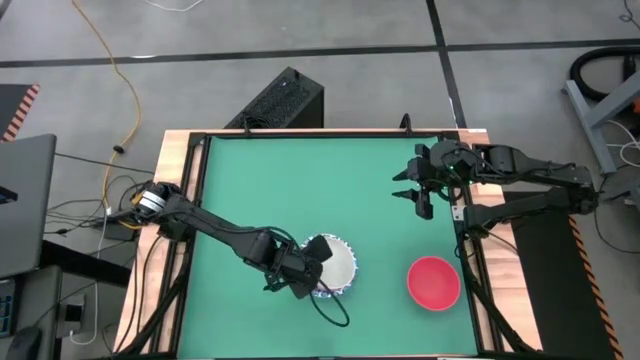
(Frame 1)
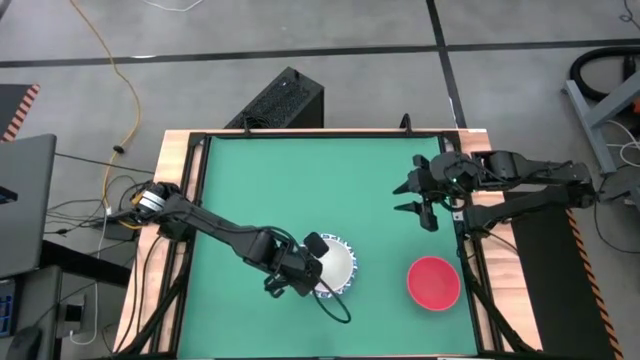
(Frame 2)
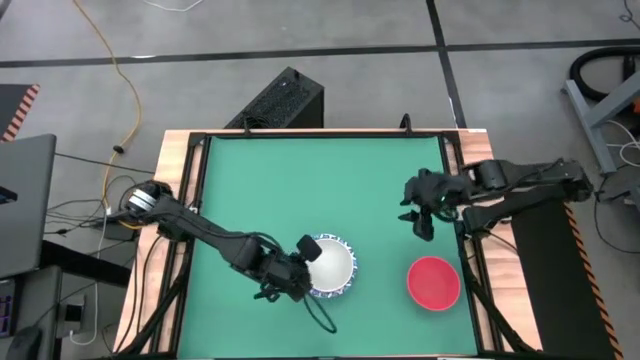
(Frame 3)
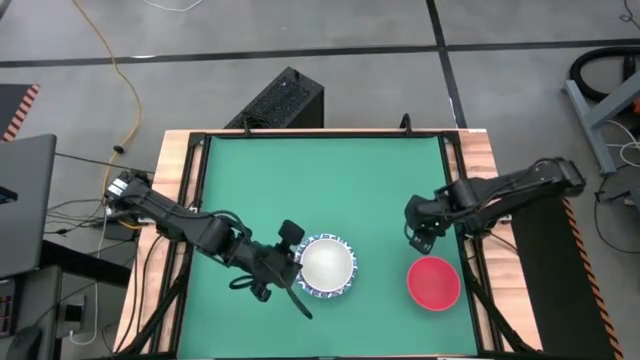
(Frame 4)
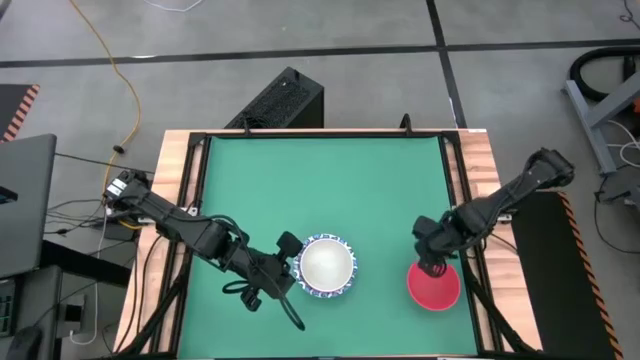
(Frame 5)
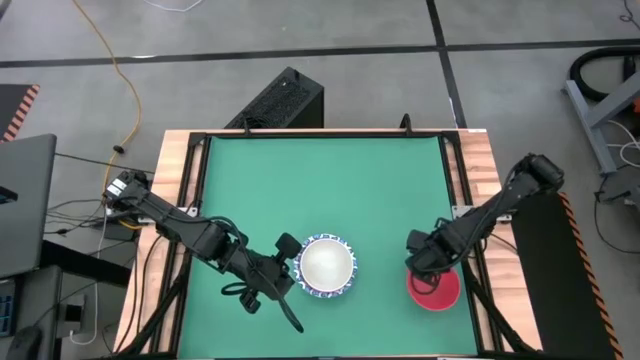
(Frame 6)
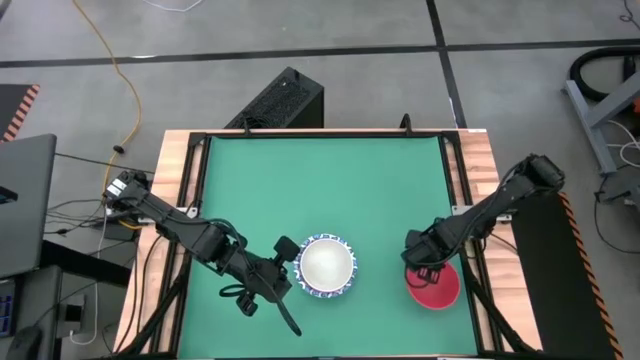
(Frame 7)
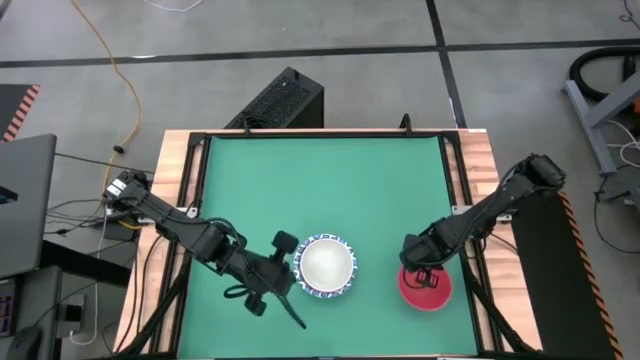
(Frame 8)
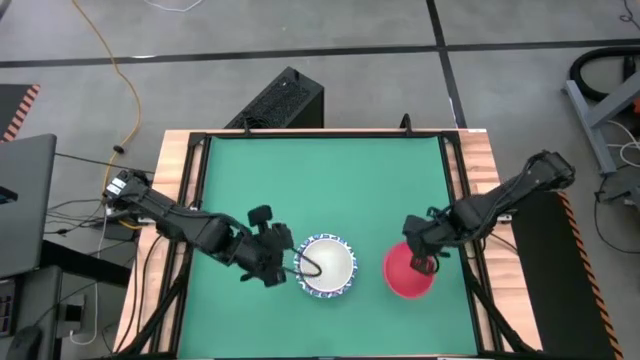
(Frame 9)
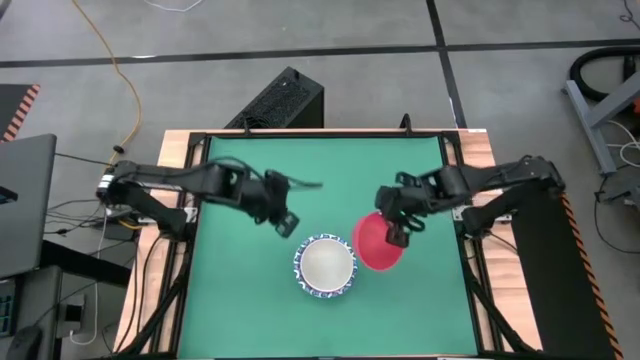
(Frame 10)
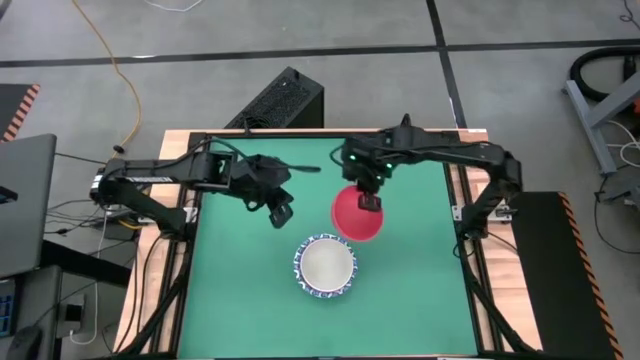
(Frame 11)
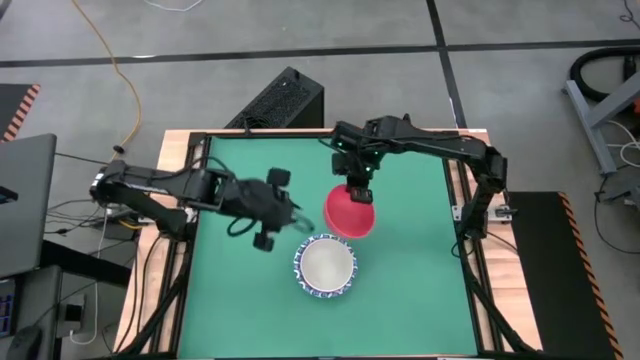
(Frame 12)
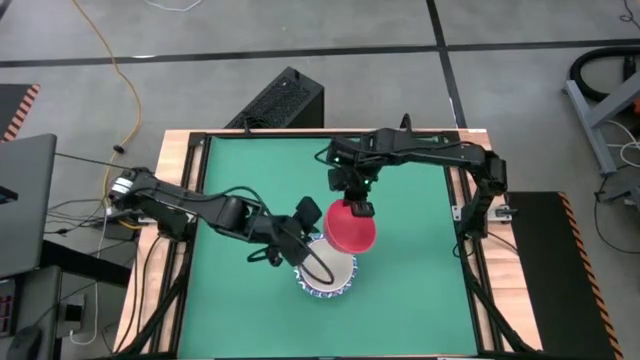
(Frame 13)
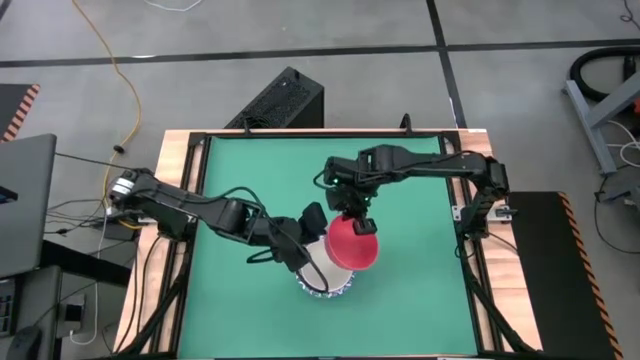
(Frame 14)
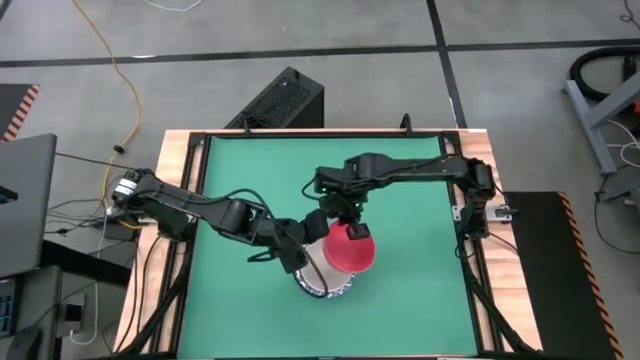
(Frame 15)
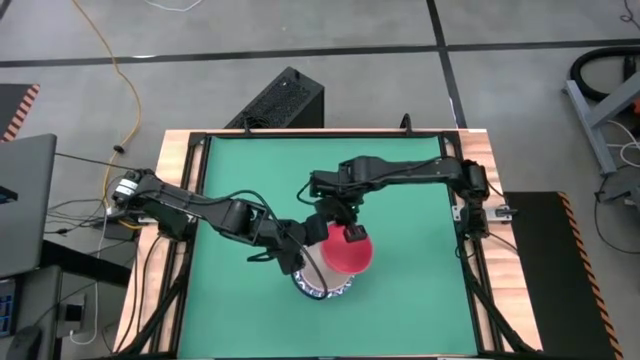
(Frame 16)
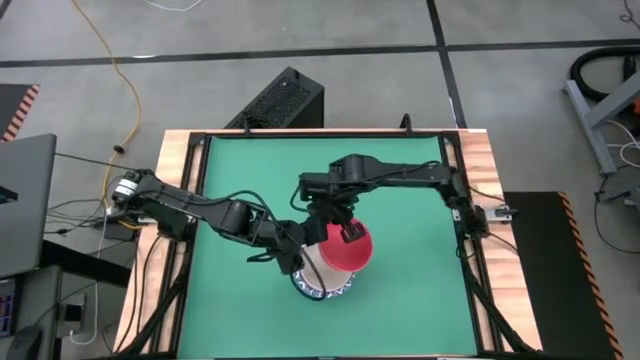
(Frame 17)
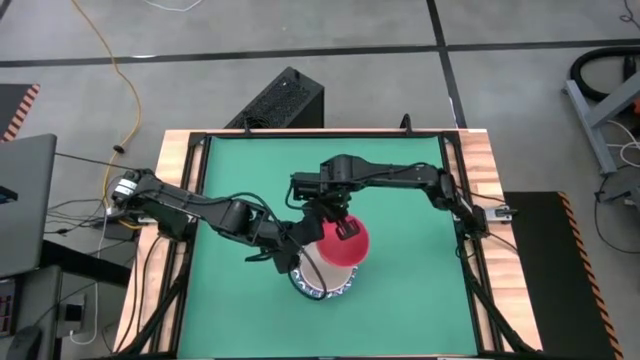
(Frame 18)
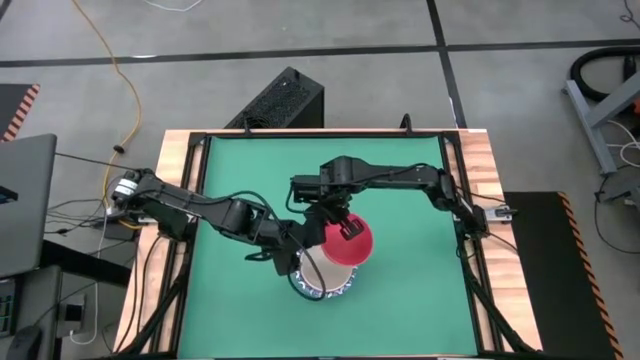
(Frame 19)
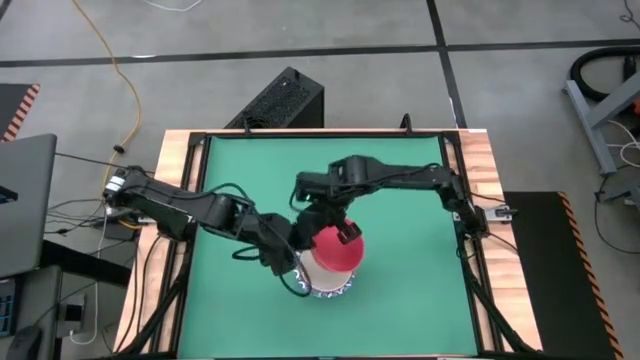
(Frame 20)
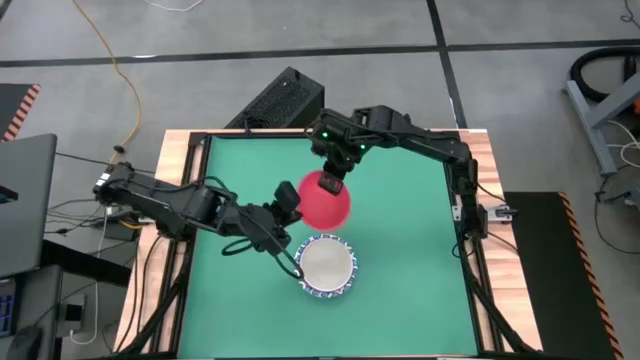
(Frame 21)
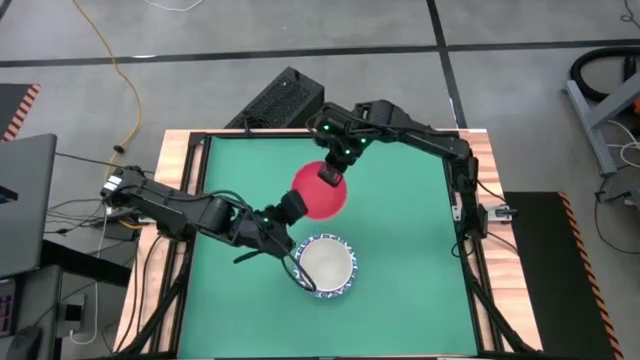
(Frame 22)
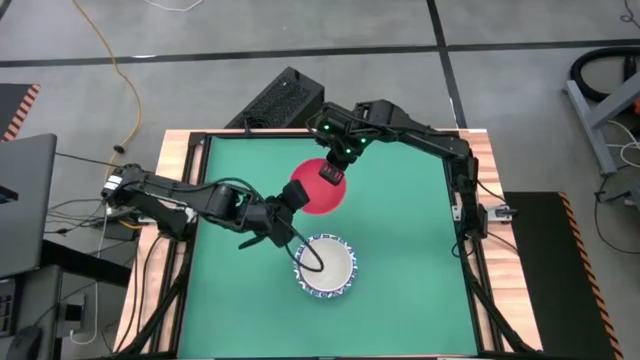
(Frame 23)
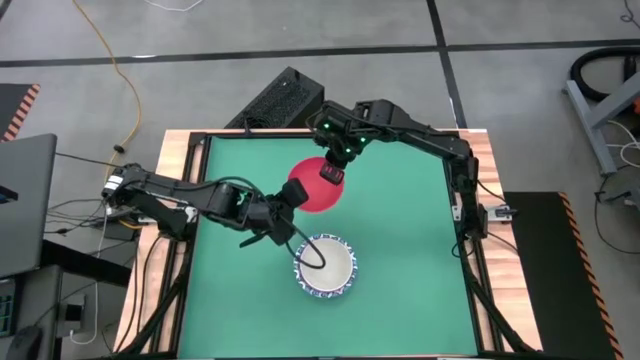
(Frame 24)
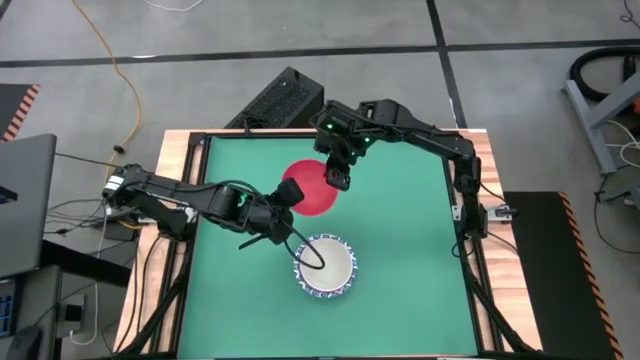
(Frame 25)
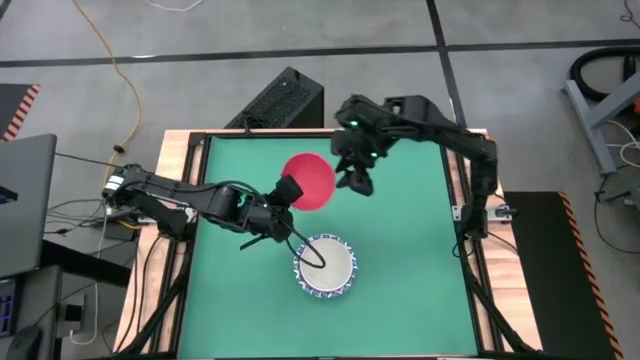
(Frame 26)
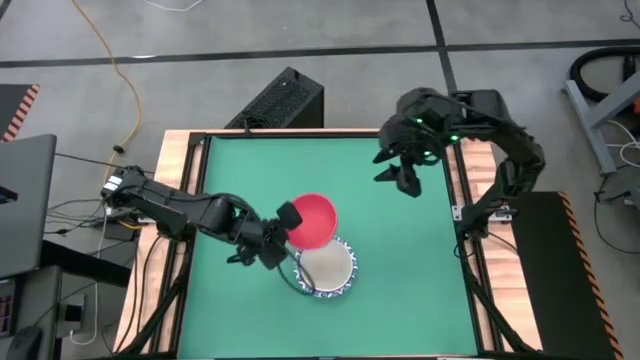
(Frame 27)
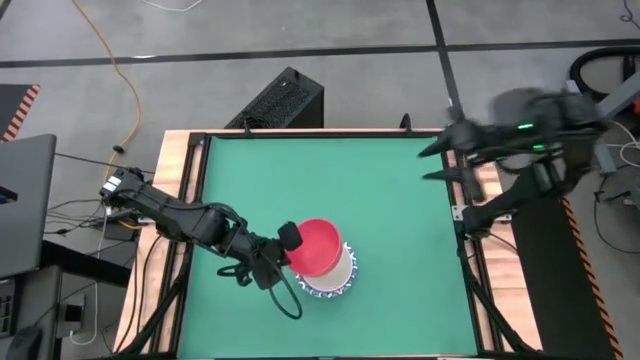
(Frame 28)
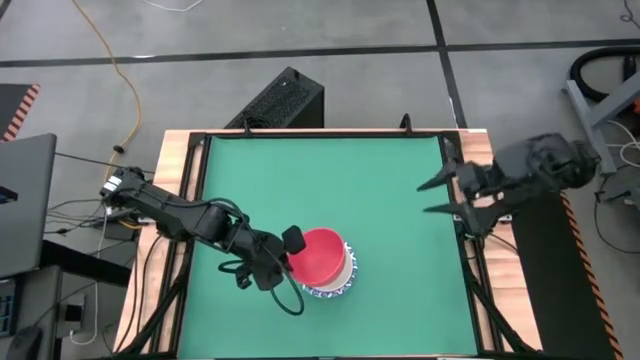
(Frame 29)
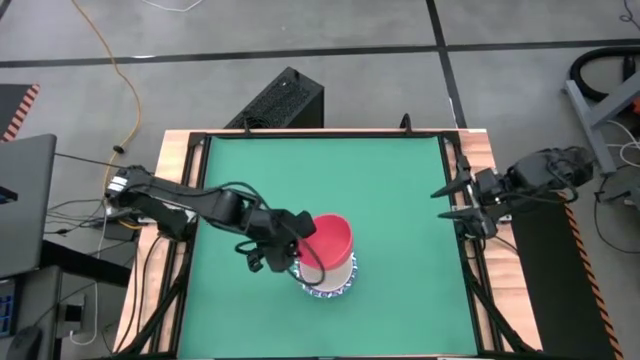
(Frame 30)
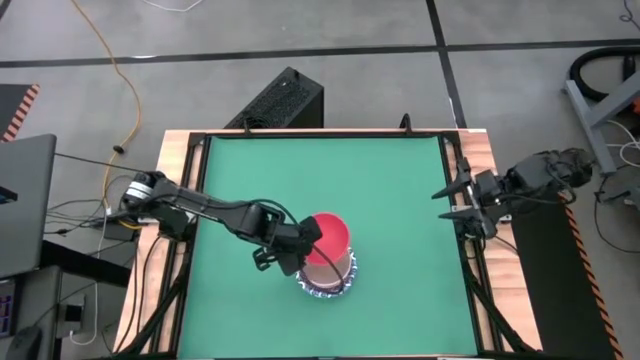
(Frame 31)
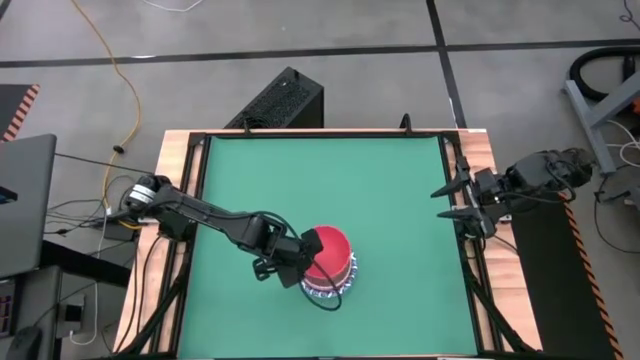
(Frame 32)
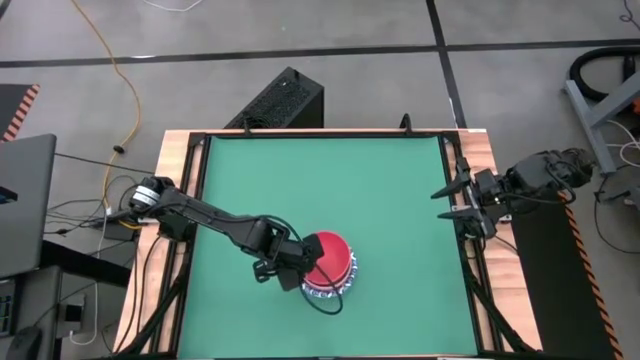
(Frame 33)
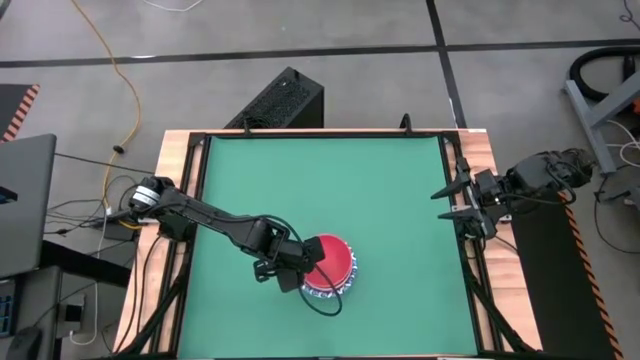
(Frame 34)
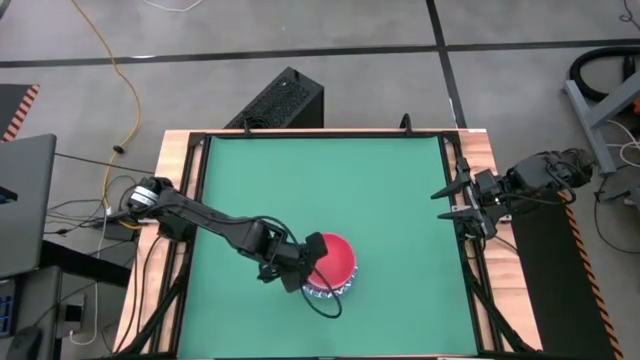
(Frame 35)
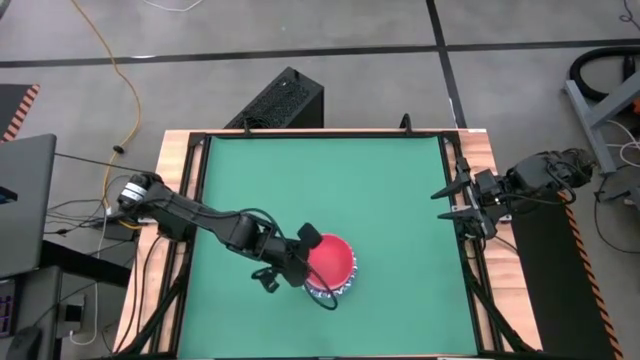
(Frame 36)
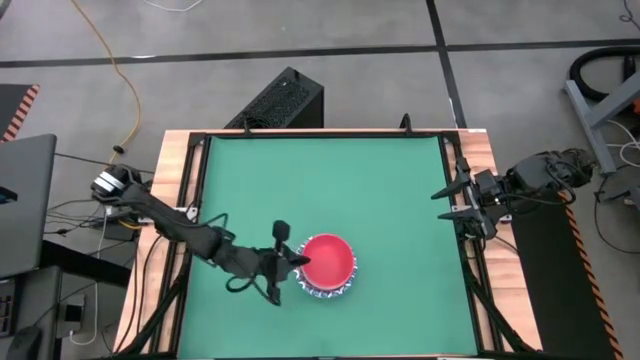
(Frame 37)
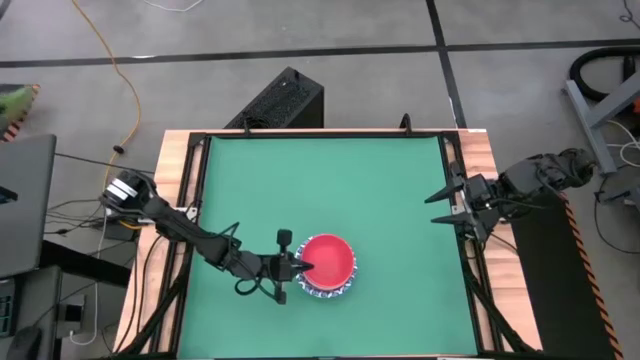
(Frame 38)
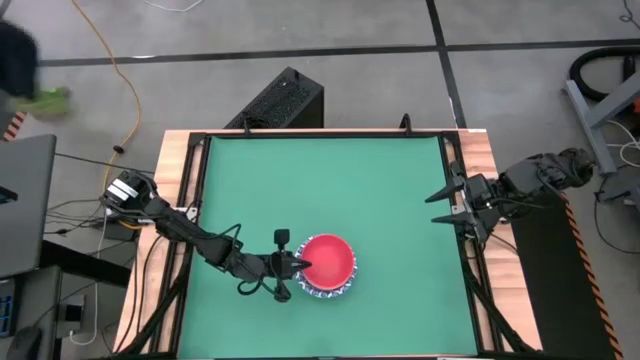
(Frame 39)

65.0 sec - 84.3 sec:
Stack the orange bowl on top of the white bowl
